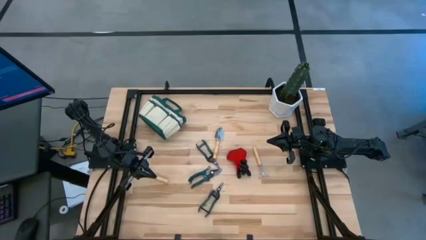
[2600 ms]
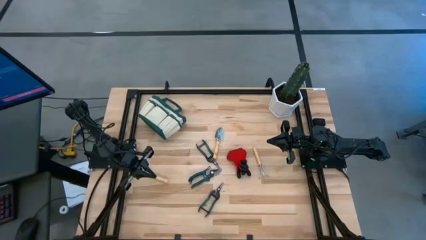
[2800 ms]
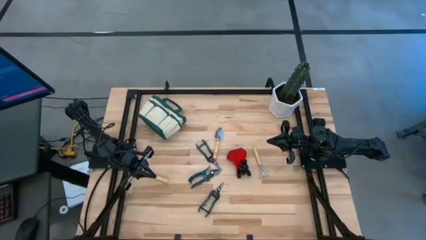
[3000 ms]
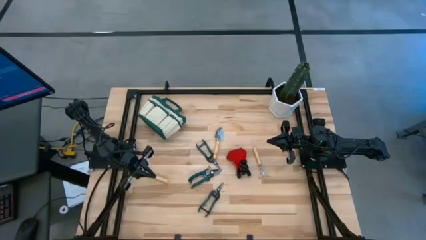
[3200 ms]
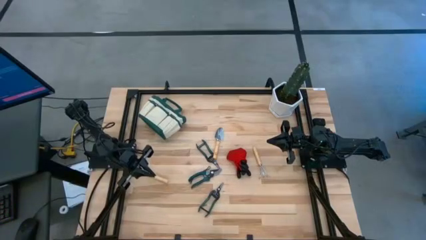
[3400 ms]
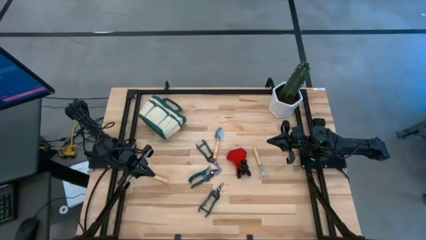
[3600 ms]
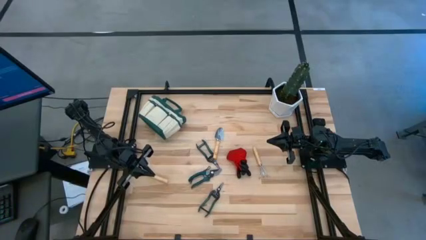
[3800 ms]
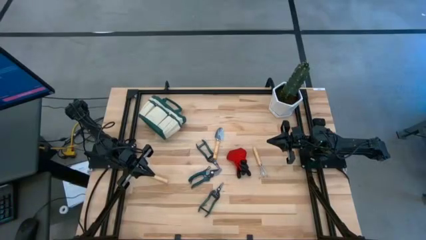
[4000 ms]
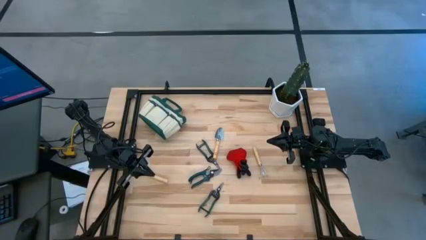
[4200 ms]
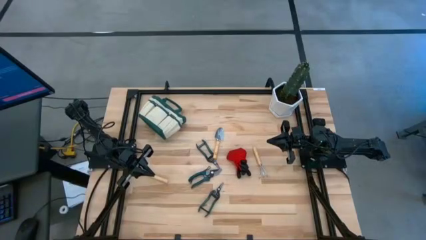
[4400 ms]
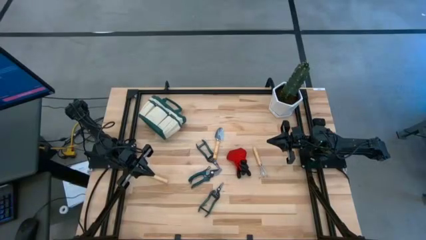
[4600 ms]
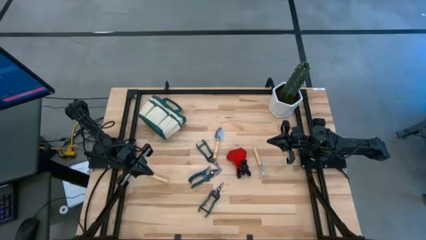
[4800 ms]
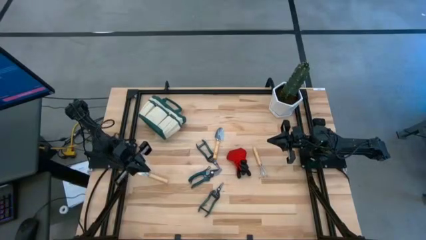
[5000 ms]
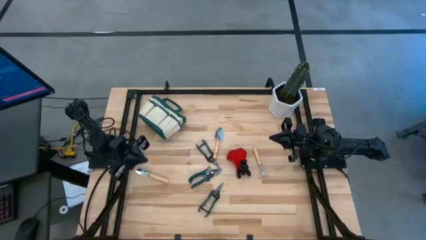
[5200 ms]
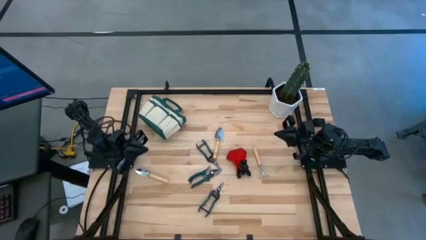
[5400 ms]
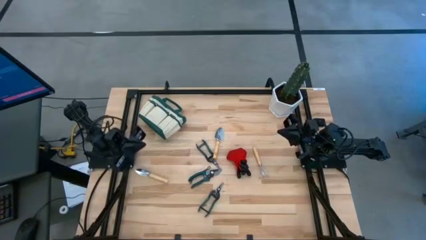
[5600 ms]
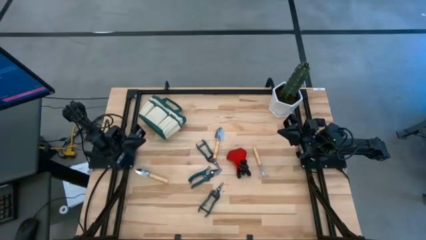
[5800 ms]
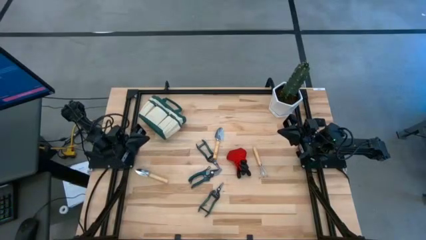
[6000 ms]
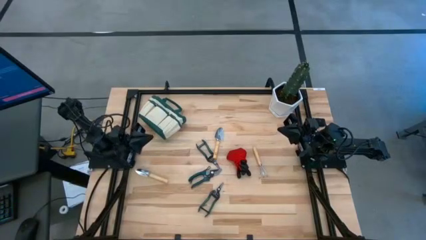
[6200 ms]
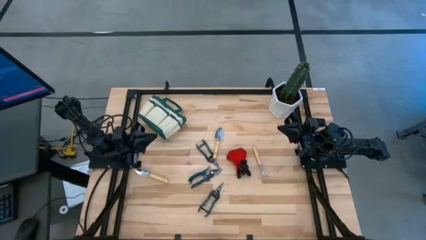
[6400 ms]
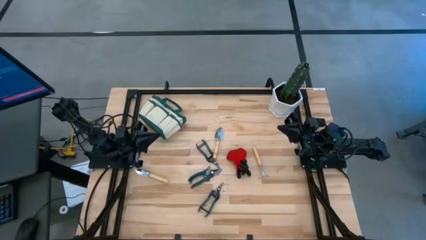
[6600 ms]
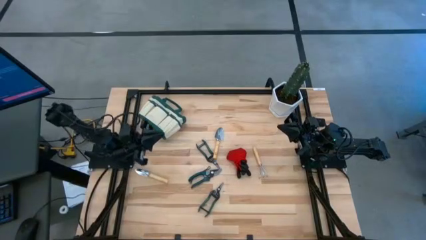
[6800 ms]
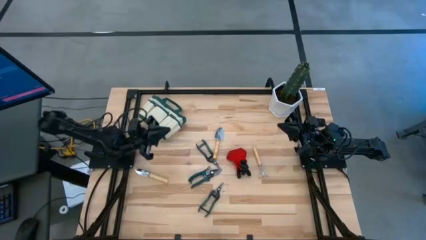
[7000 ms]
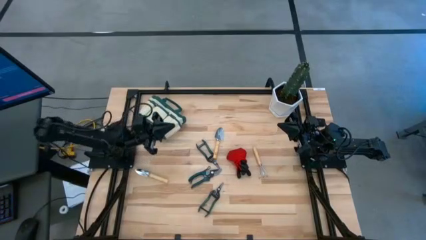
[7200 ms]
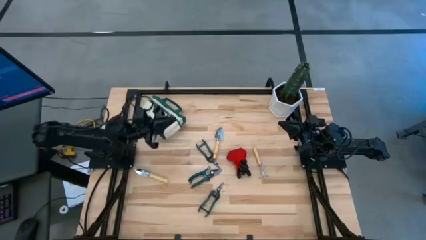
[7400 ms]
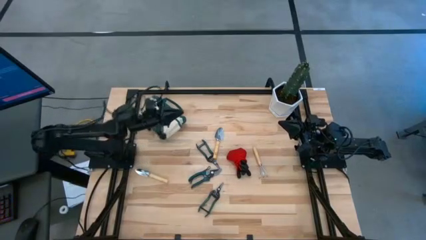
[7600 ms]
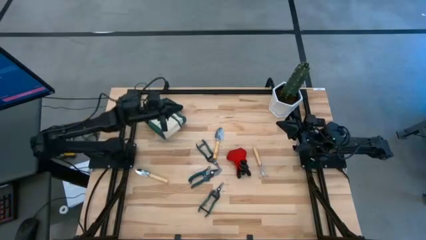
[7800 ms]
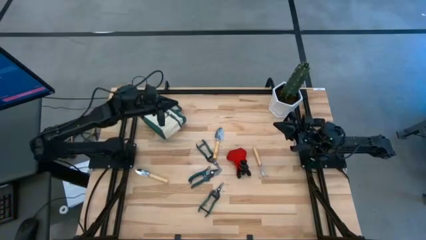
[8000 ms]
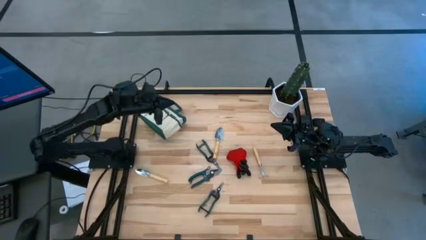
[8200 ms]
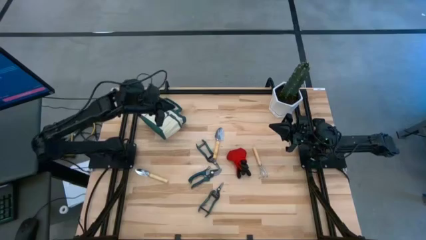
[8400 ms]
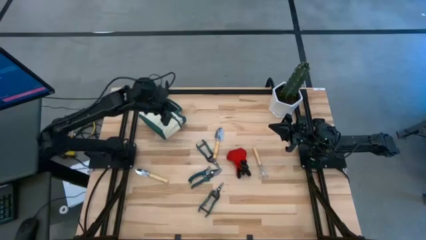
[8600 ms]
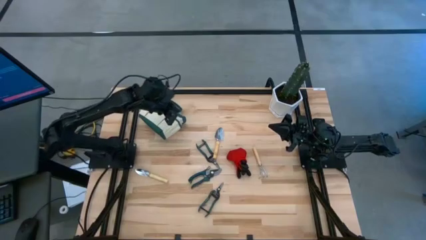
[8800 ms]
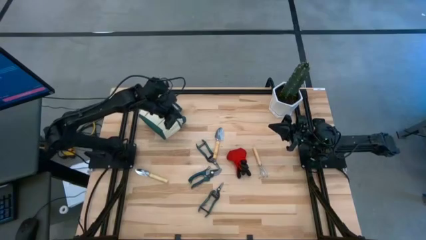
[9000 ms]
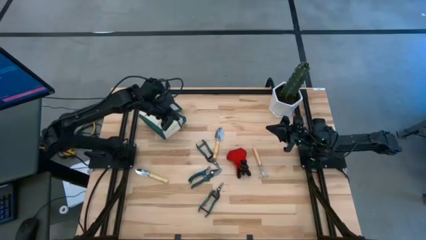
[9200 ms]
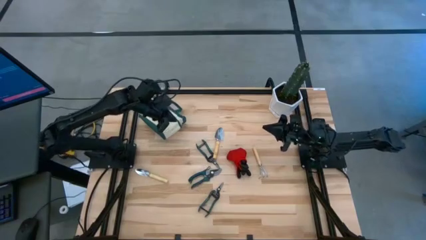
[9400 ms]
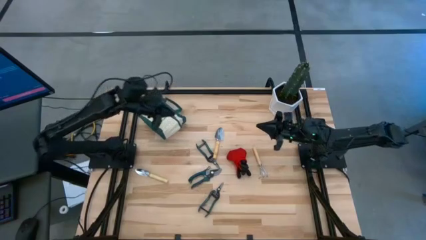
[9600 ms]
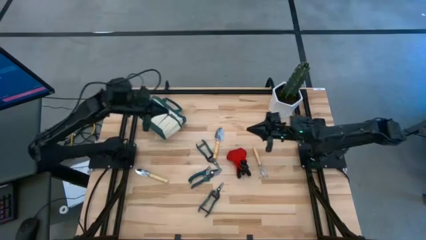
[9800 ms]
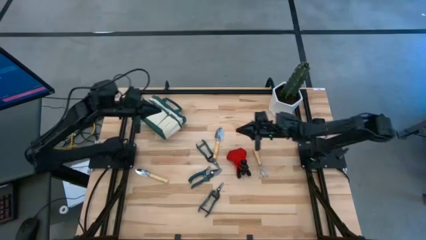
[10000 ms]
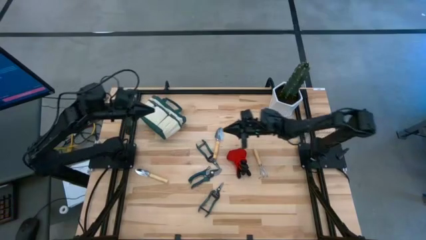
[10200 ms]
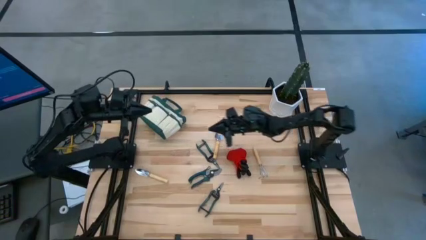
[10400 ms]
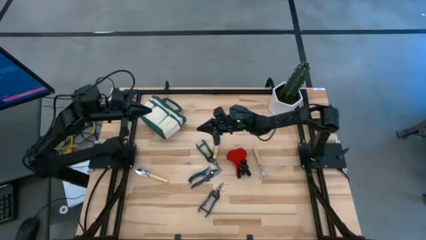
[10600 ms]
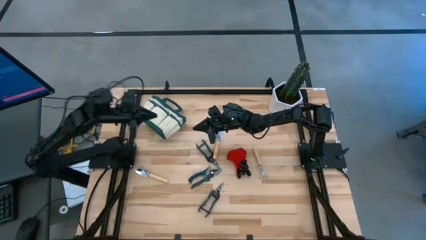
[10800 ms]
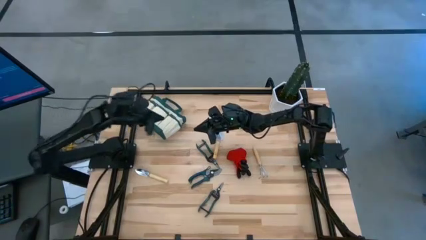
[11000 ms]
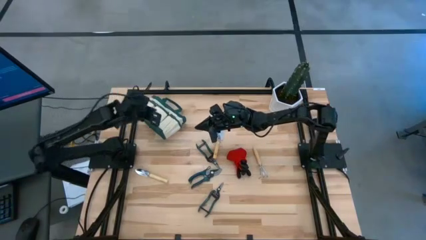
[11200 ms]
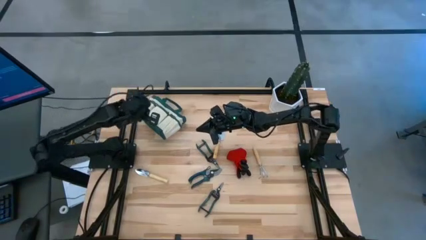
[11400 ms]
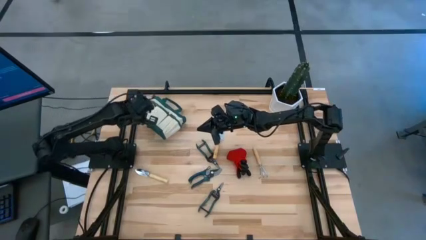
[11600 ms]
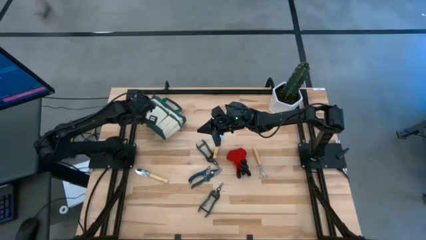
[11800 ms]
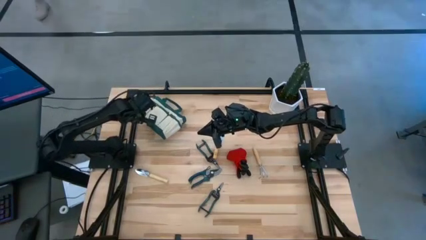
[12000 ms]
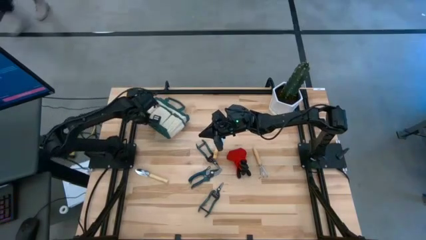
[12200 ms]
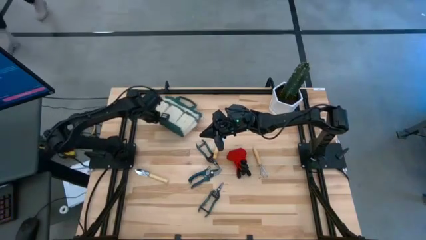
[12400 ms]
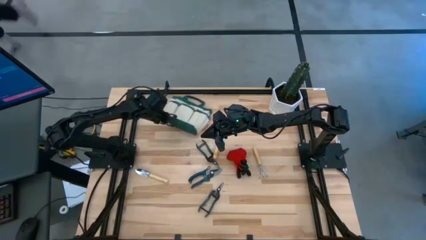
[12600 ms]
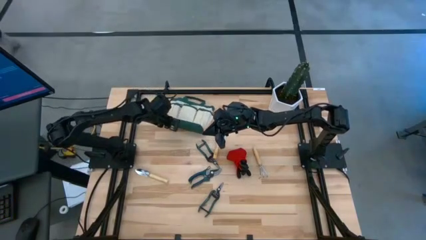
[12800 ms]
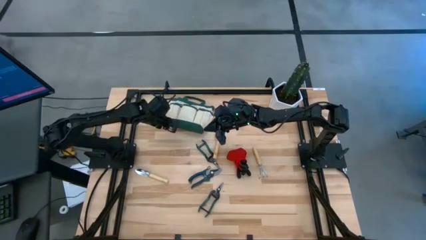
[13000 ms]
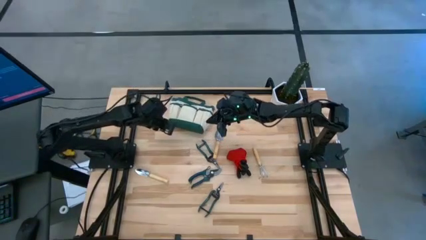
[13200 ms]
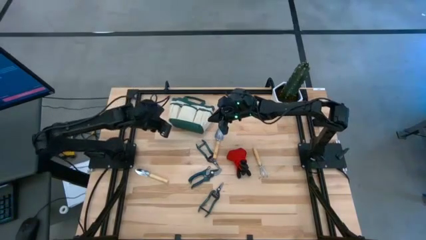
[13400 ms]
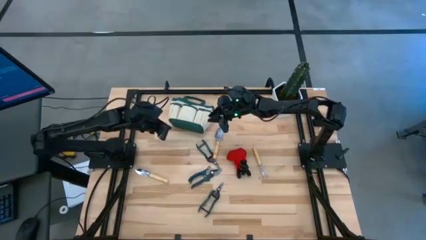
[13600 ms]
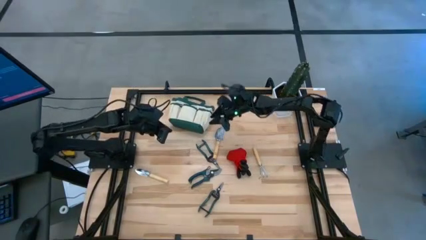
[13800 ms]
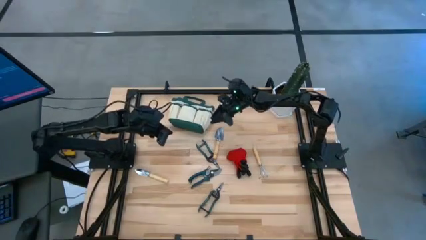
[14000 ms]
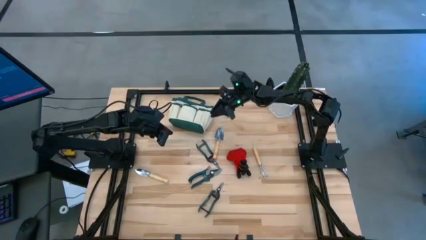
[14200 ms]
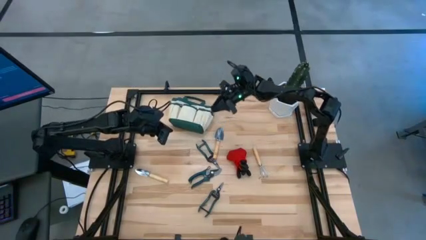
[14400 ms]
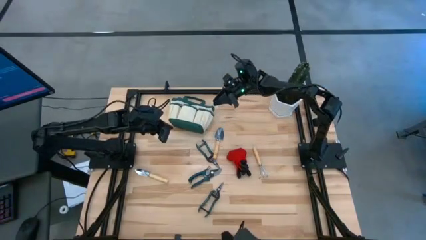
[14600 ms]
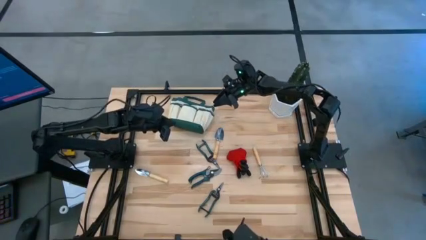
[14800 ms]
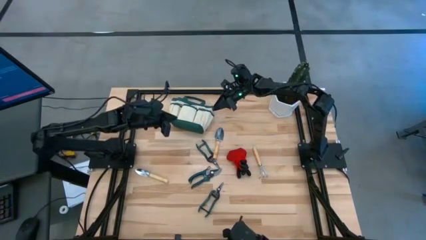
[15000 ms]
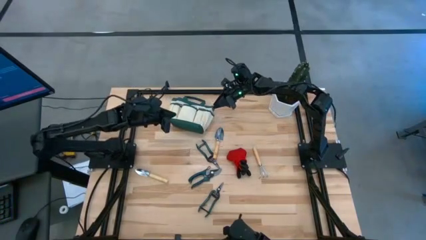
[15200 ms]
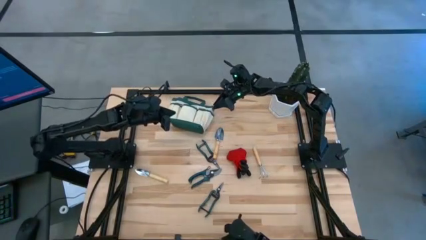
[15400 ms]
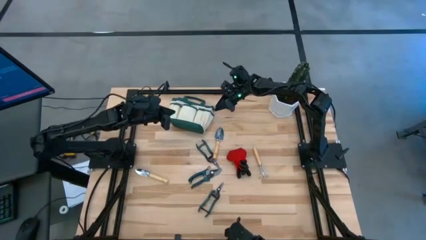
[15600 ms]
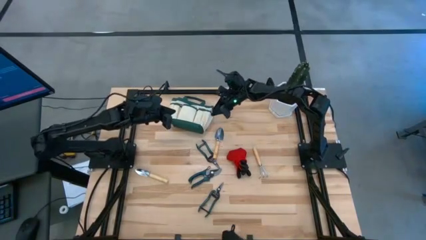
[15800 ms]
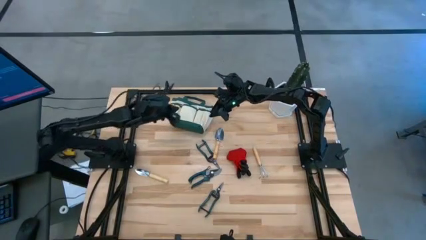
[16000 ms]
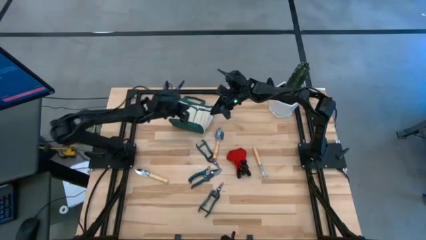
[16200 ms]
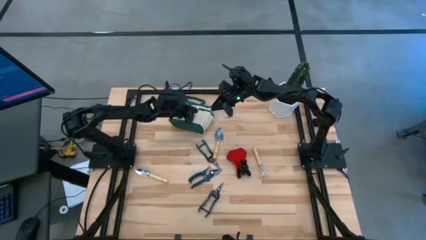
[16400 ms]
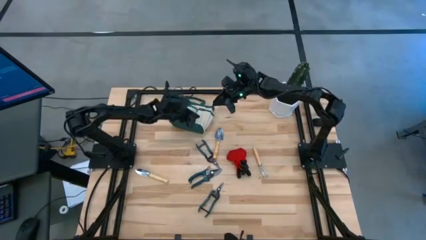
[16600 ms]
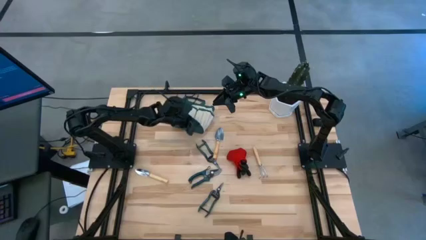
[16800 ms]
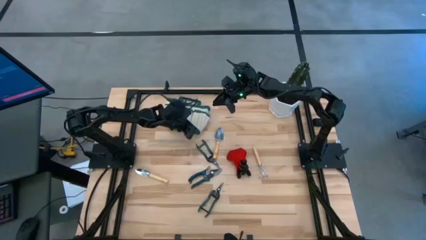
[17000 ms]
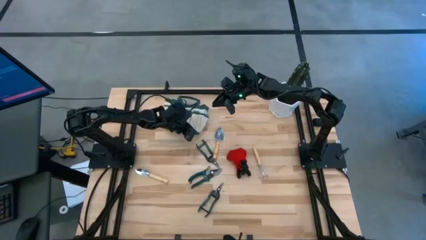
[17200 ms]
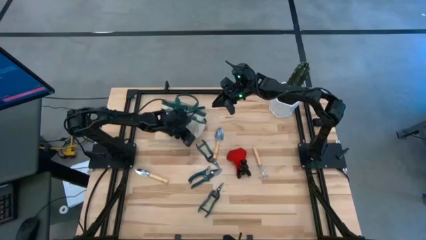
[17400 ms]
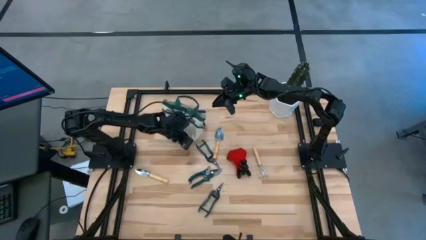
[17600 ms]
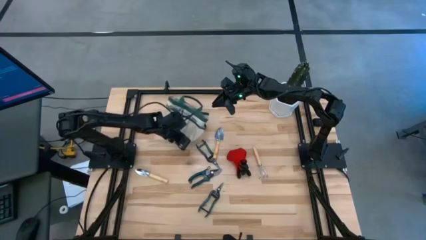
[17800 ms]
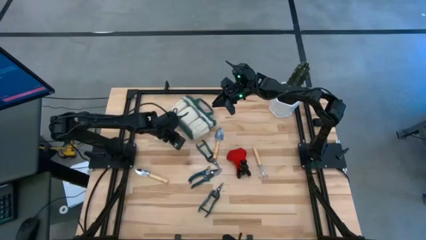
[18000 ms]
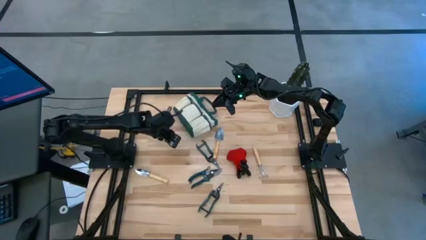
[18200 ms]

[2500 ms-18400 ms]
Task: Pick & Place Garden tools in Gardening bag
Prepare the brown gardening bag
